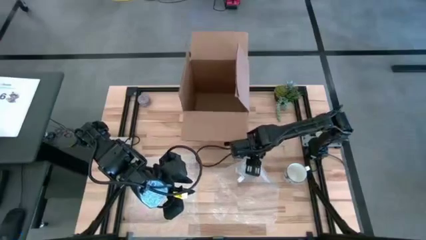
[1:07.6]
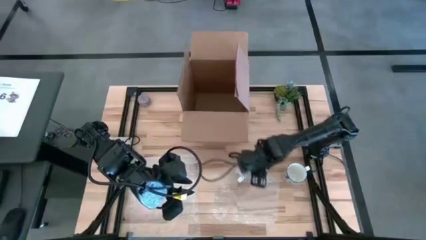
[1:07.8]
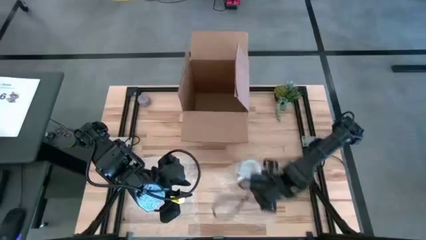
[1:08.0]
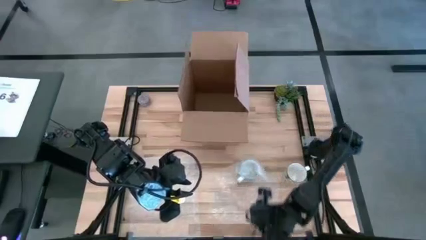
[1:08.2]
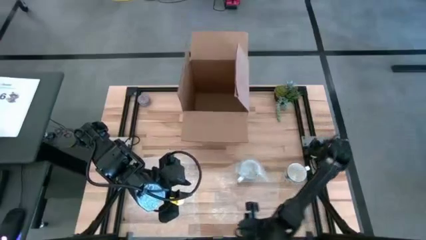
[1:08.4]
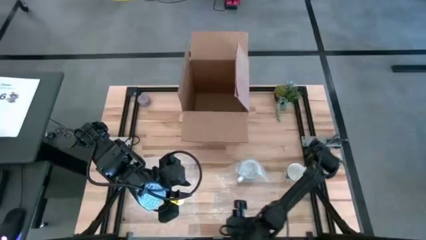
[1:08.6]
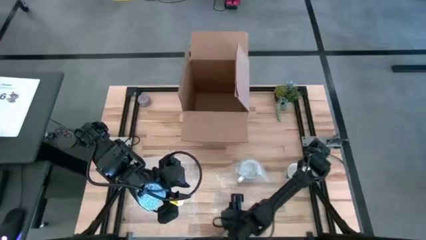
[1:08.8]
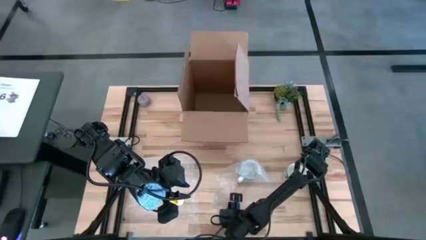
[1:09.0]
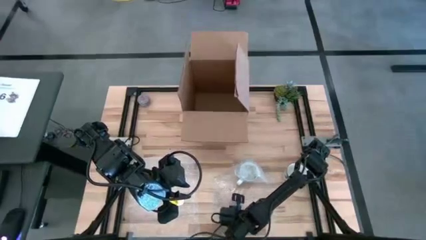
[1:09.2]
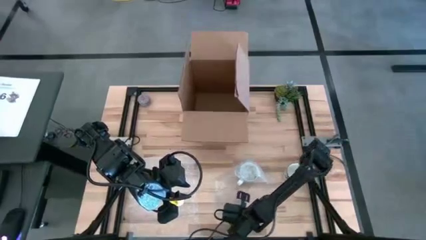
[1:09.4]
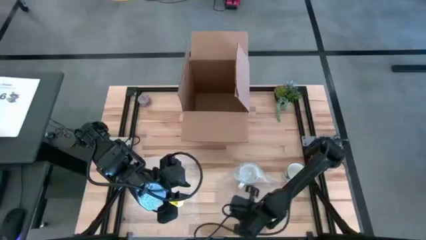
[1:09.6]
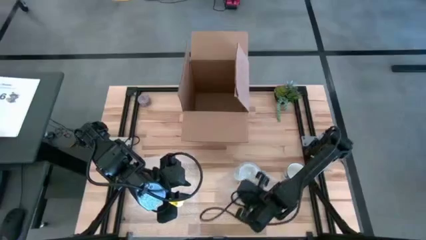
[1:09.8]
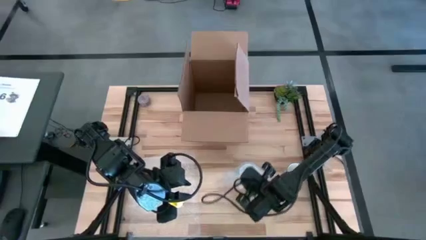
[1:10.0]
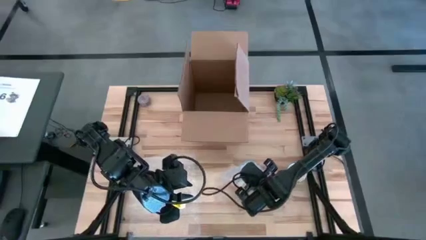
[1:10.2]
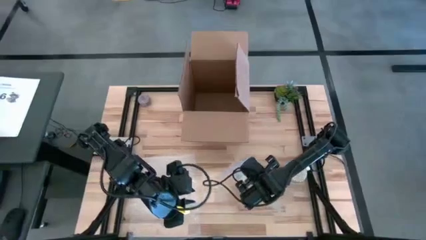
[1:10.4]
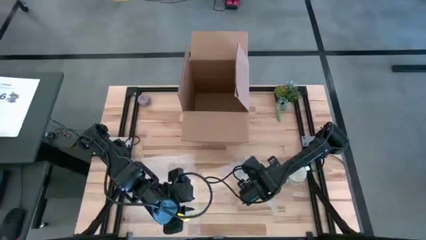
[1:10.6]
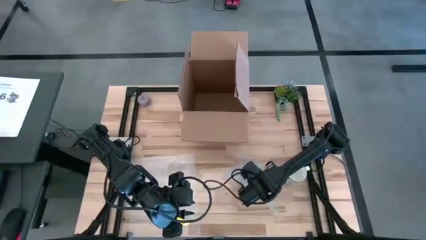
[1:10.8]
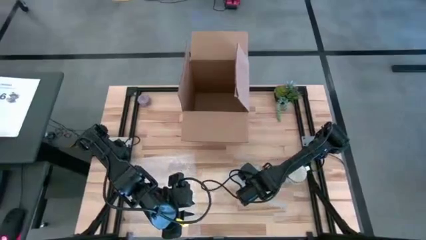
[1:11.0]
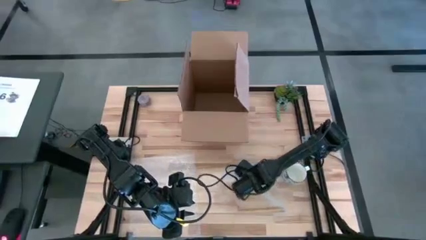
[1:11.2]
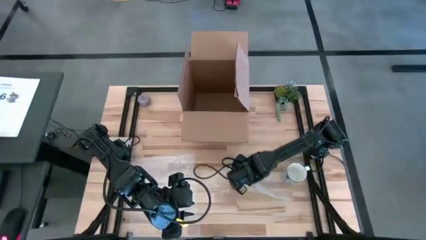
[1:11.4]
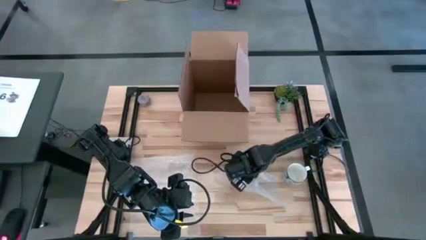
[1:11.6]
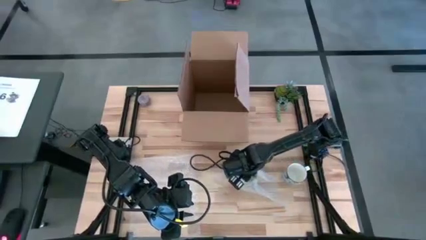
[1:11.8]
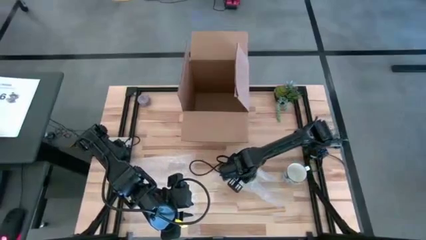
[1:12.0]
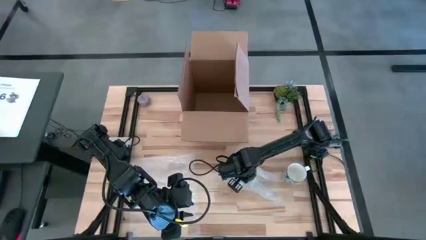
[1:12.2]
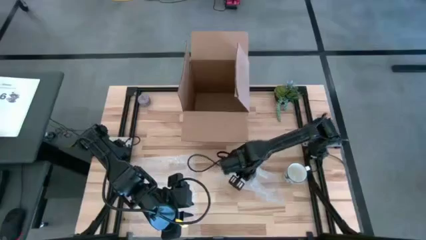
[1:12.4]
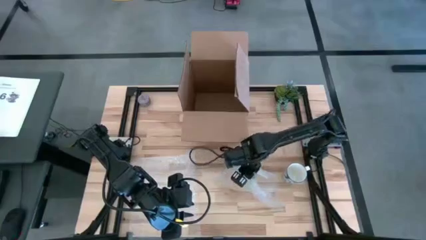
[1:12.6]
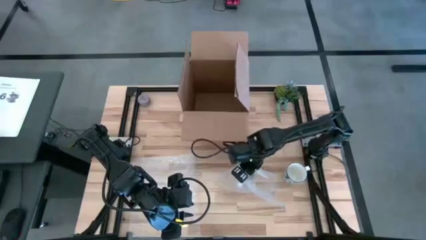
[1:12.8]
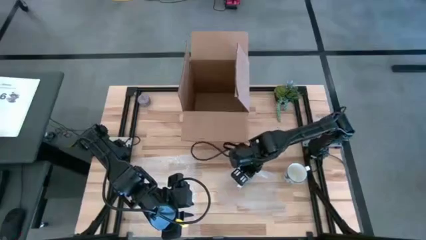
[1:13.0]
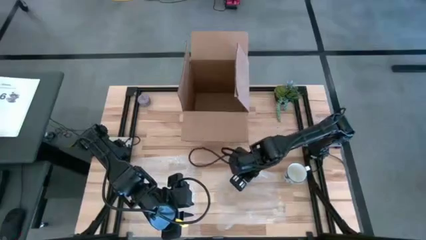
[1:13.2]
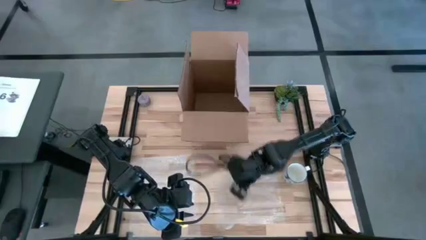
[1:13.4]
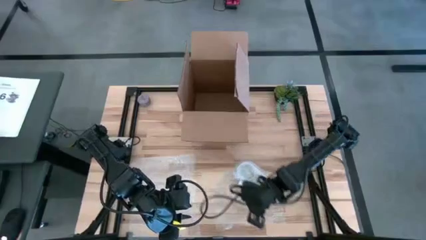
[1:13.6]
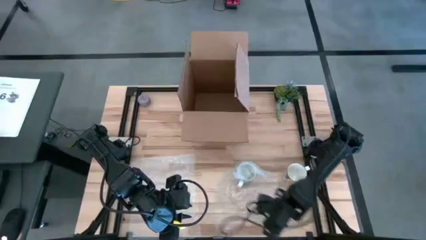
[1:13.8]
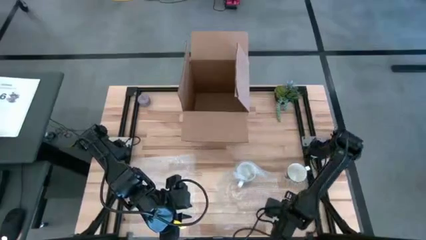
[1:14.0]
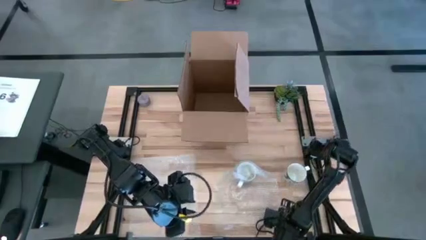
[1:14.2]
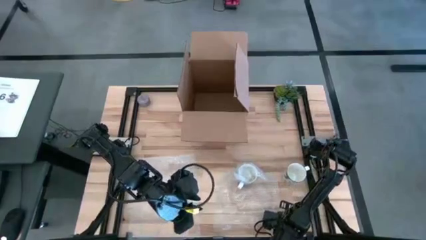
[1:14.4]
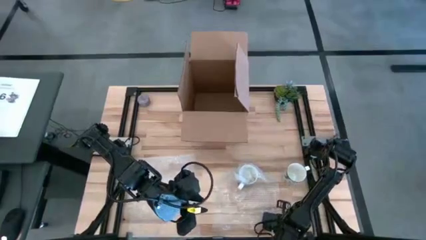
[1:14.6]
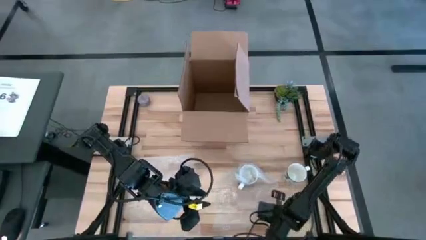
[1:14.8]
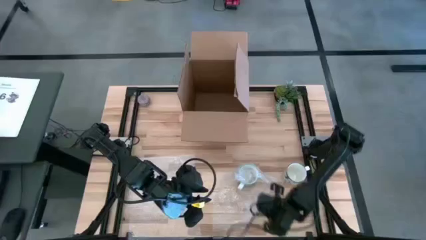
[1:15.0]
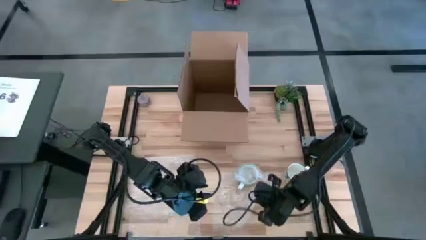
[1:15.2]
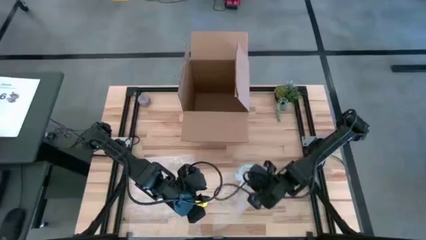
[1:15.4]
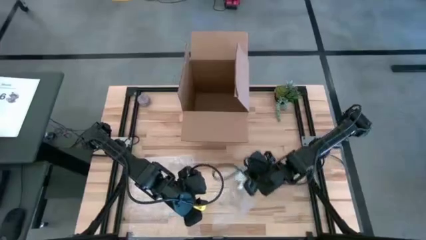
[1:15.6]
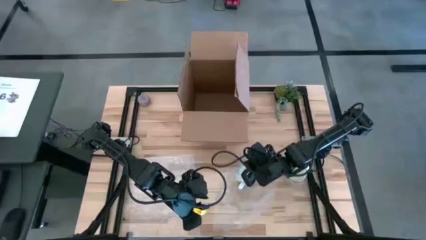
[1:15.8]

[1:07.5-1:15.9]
Task: wrap mug
Wrap the blue patterned mug with the right transparent bubble wrap

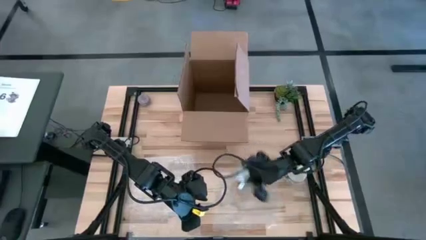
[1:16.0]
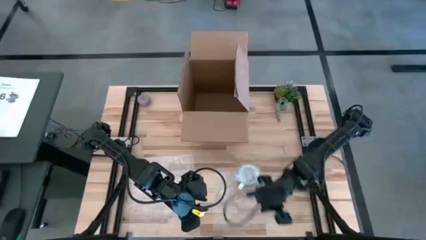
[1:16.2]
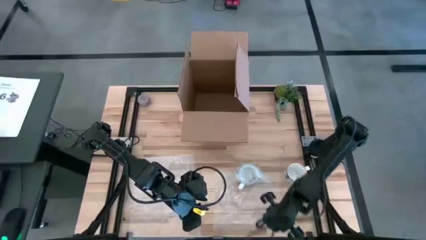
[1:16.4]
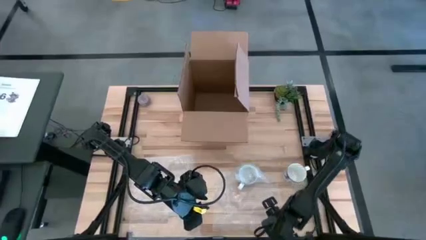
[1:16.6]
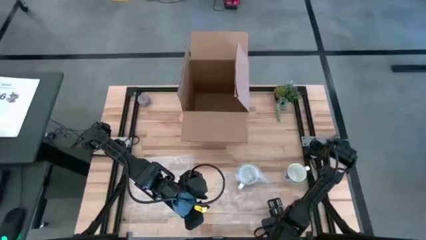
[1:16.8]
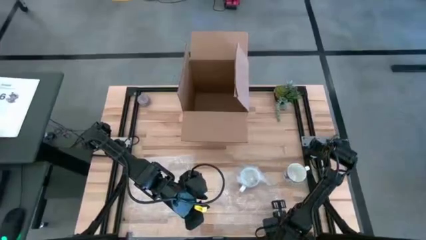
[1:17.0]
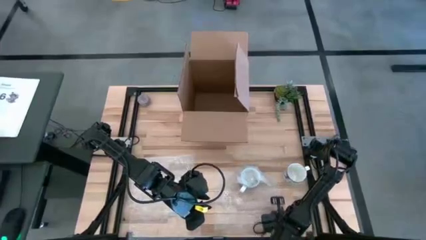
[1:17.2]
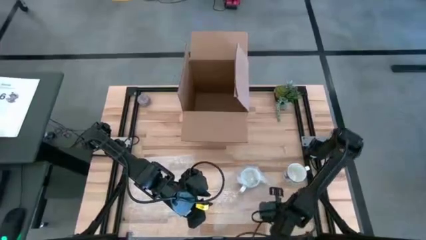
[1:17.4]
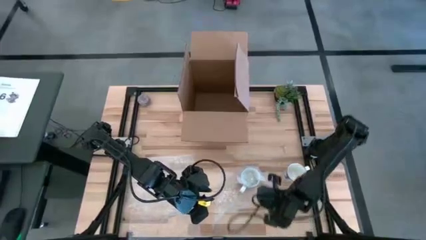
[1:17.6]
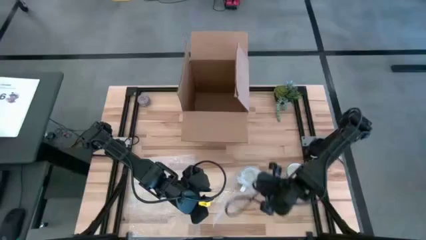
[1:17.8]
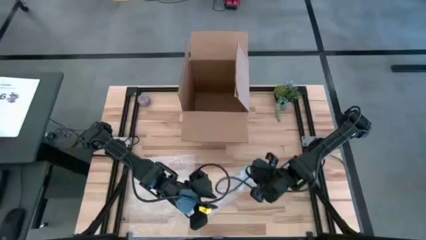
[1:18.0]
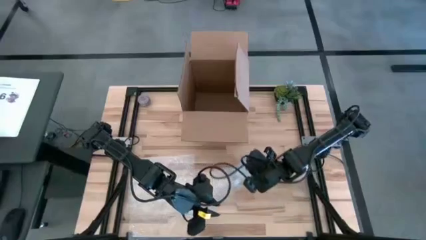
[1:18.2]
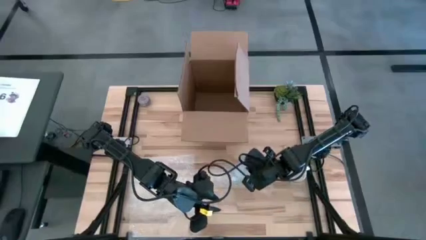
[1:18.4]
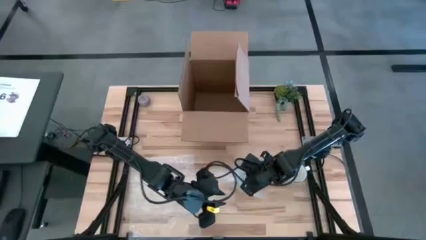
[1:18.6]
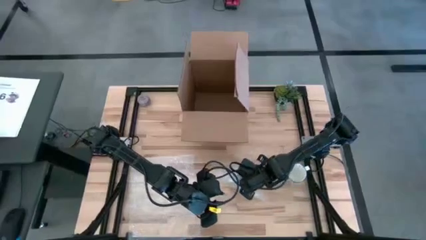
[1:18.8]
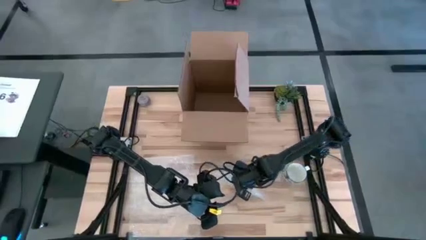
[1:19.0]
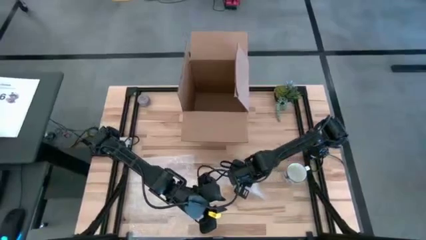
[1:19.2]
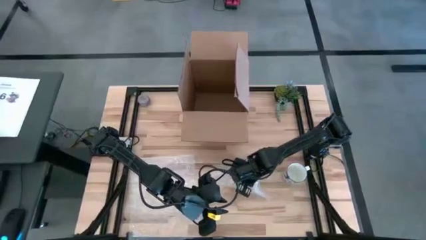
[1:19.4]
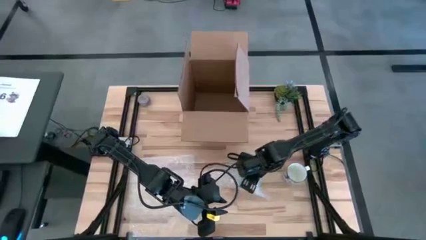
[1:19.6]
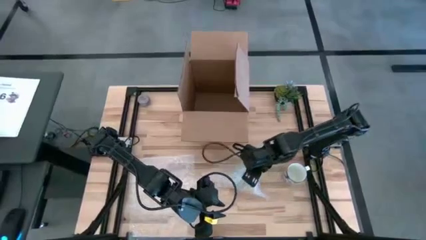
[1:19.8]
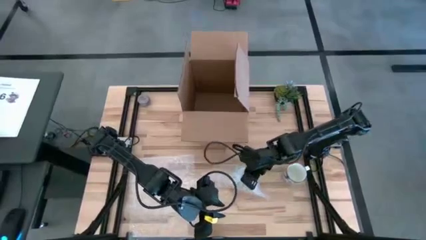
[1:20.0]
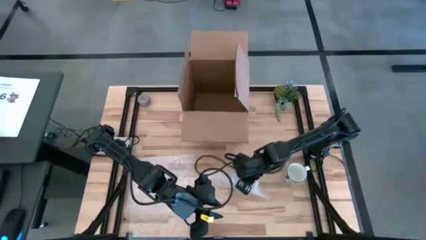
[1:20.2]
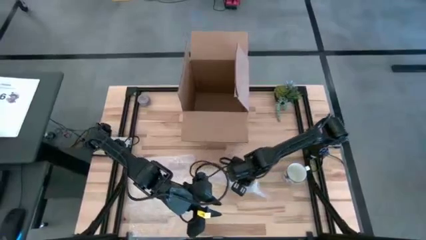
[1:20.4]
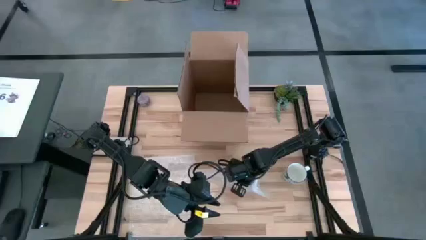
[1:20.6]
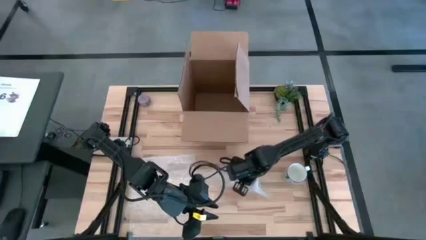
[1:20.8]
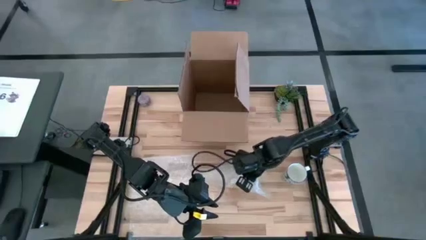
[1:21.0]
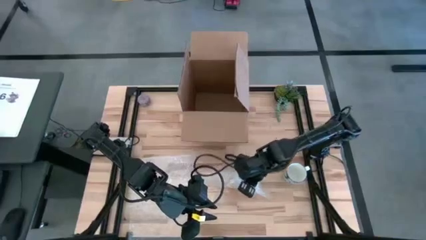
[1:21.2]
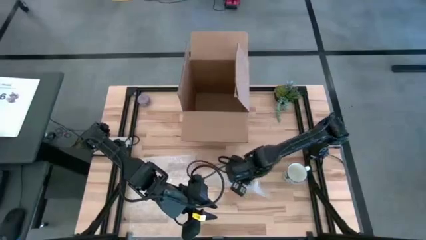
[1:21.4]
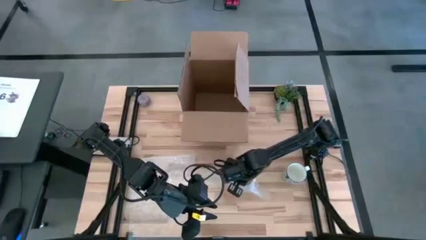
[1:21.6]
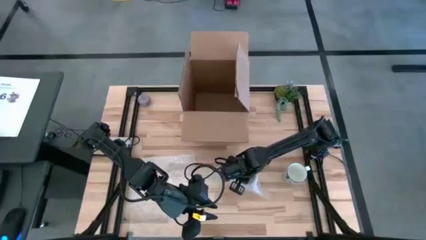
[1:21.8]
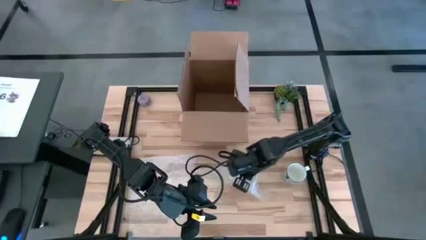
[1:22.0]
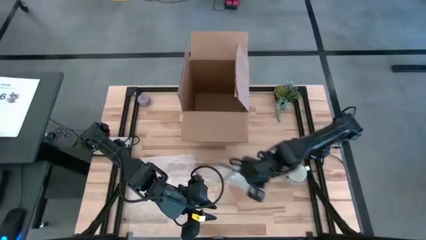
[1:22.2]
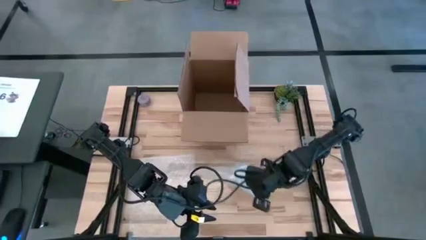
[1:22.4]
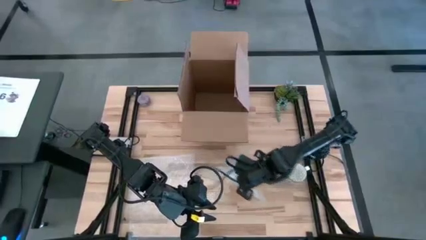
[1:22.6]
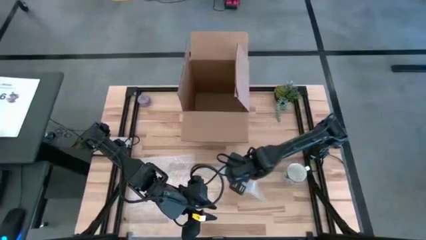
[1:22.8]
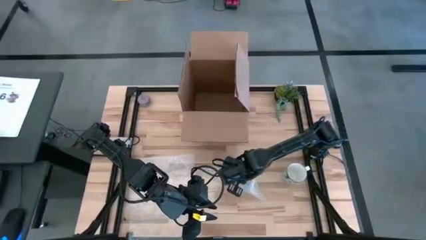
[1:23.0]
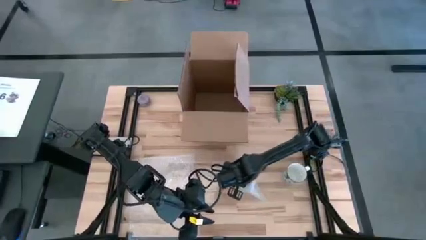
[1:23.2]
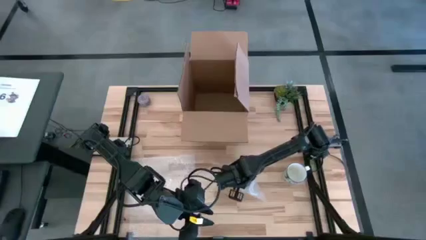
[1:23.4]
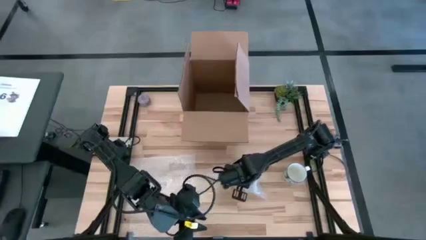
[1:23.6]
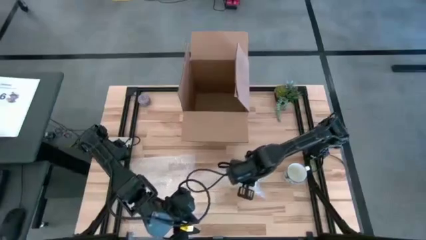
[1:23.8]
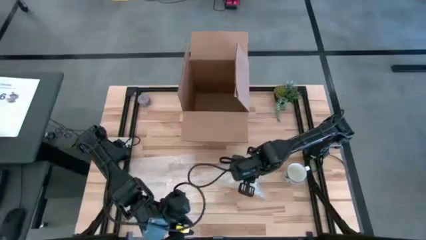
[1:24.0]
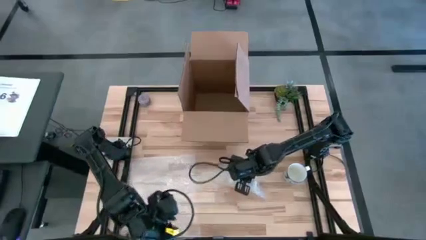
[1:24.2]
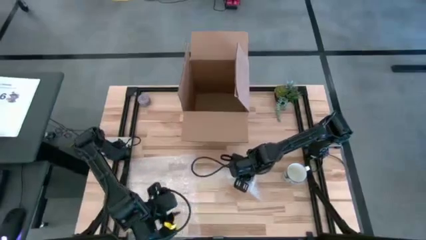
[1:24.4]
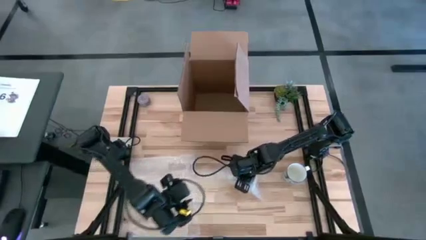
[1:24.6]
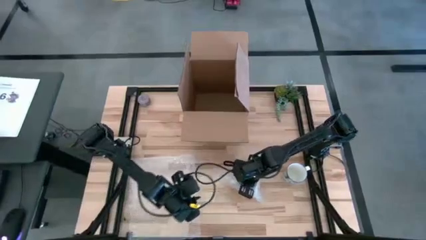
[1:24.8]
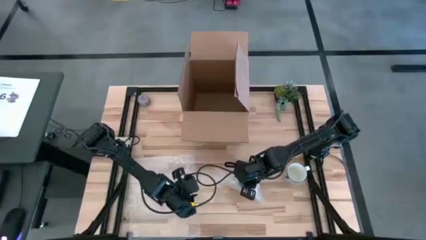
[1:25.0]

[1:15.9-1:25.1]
Wrap the blue patterned mug with the right transparent bubble wrap

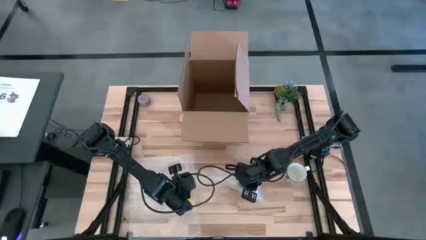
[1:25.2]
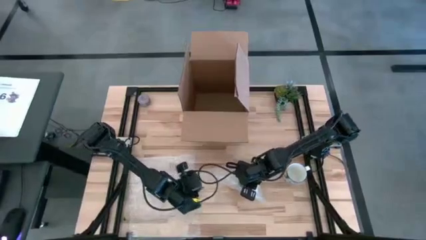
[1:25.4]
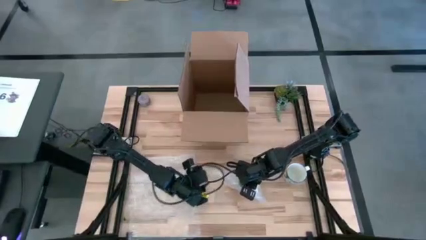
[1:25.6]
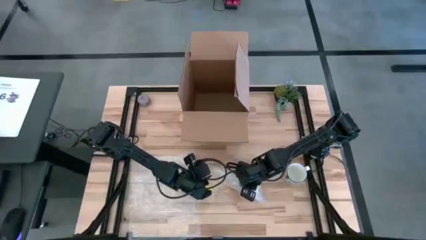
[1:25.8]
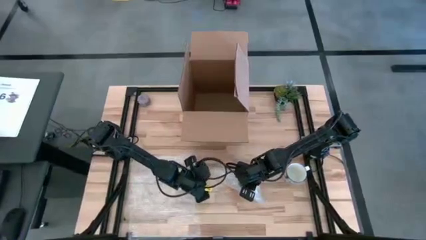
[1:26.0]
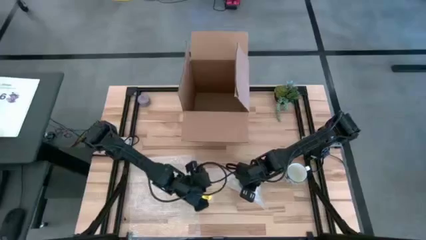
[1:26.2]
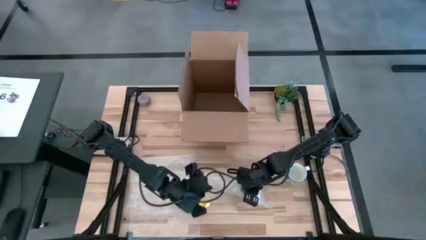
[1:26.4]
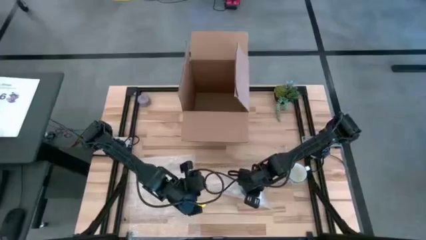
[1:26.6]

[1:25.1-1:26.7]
Wrap the blue patterned mug with the right transparent bubble wrap
